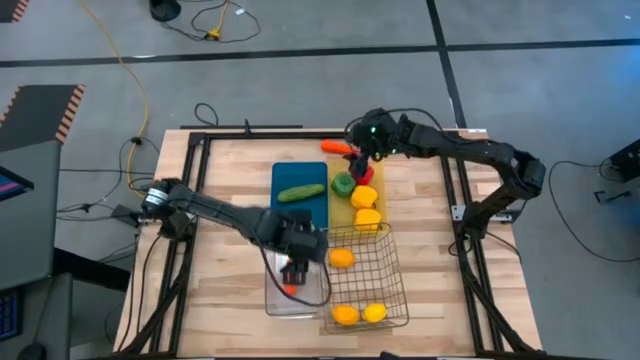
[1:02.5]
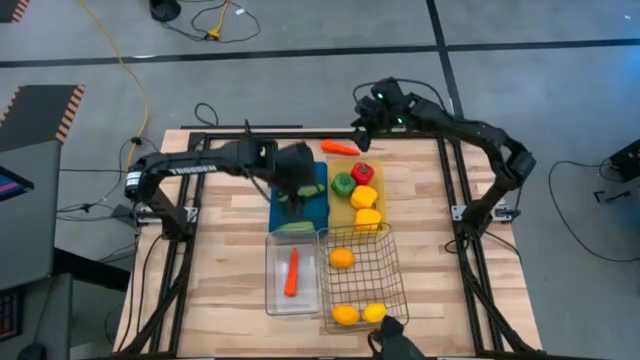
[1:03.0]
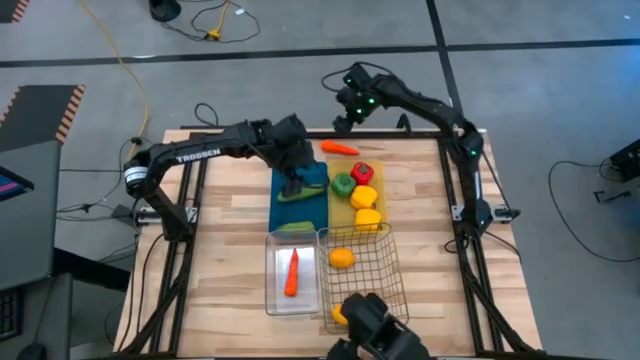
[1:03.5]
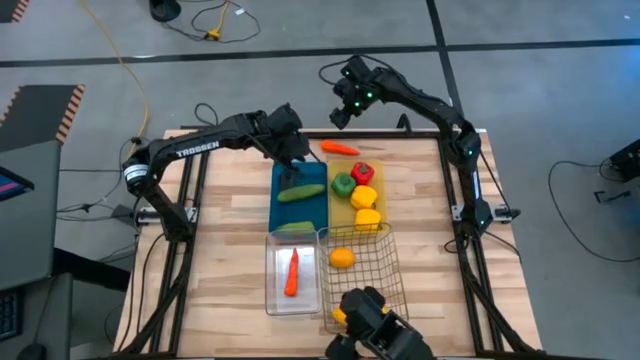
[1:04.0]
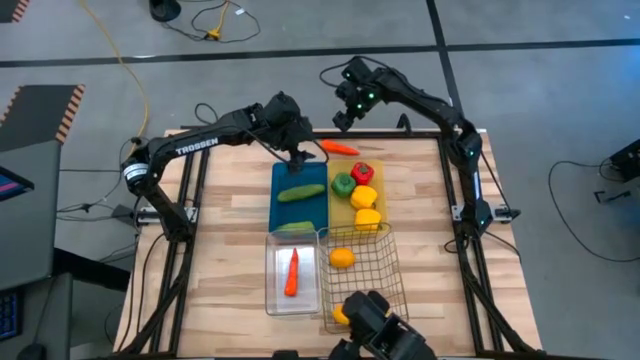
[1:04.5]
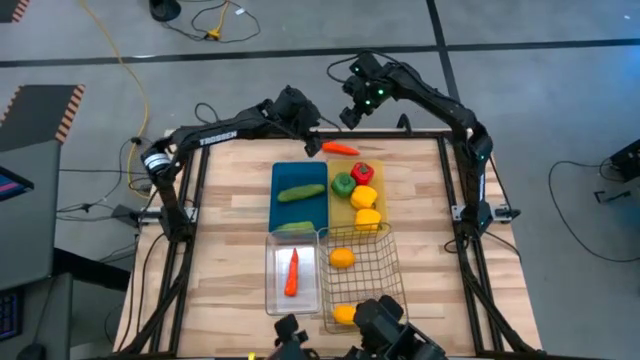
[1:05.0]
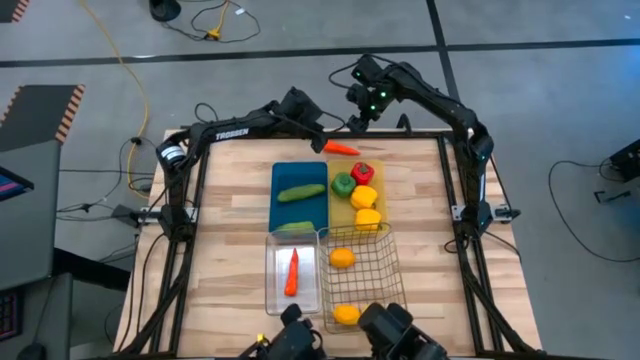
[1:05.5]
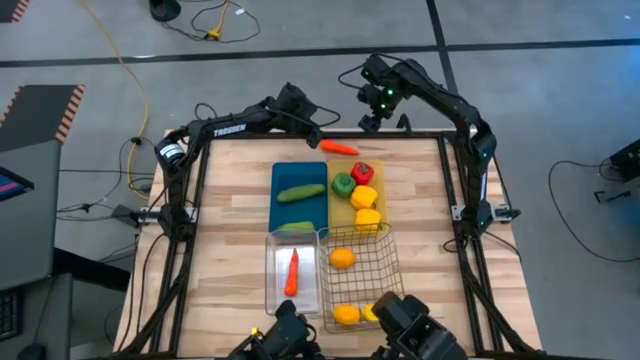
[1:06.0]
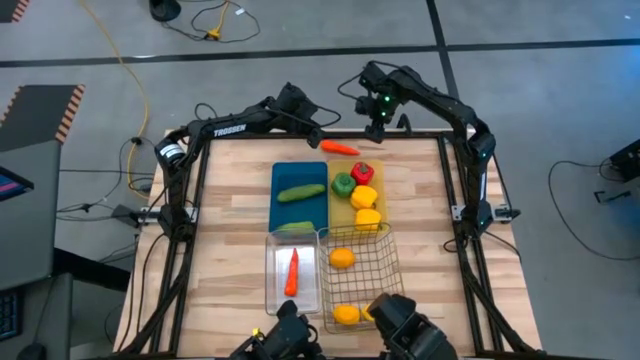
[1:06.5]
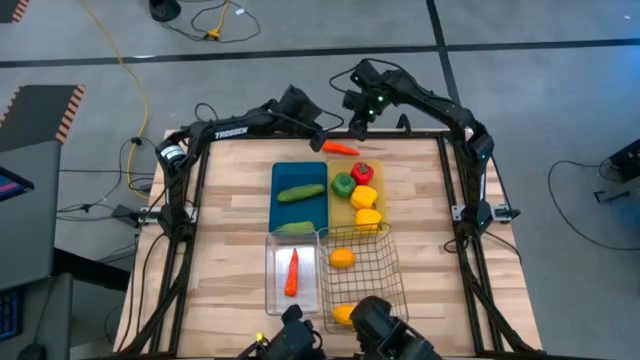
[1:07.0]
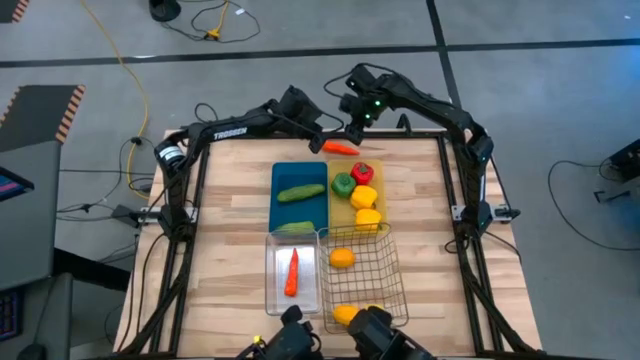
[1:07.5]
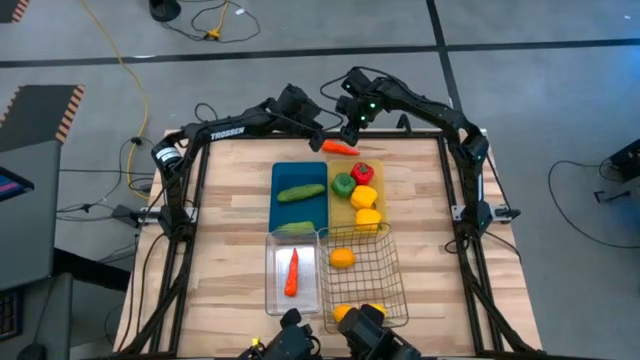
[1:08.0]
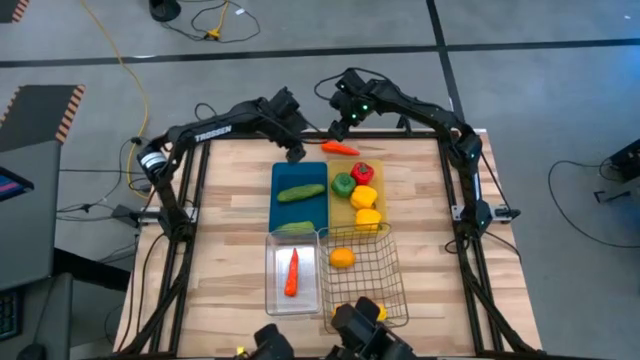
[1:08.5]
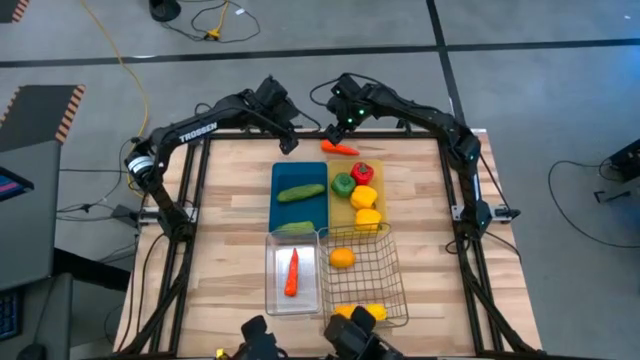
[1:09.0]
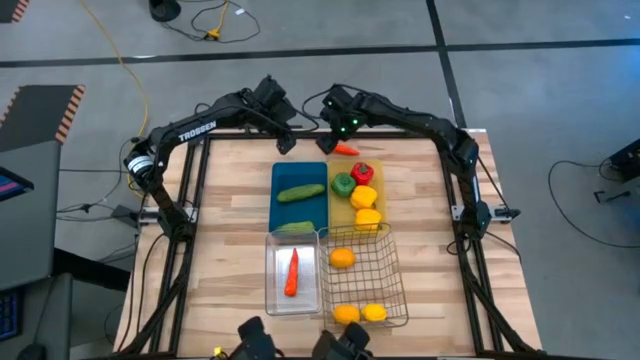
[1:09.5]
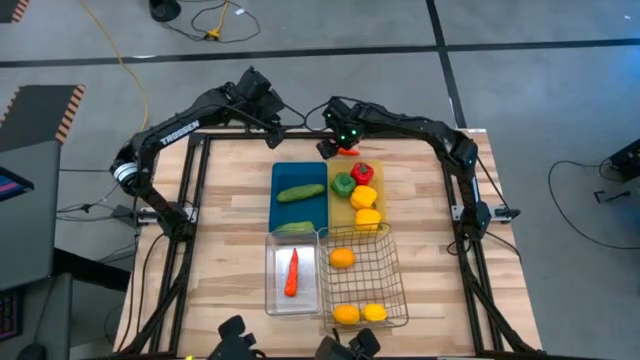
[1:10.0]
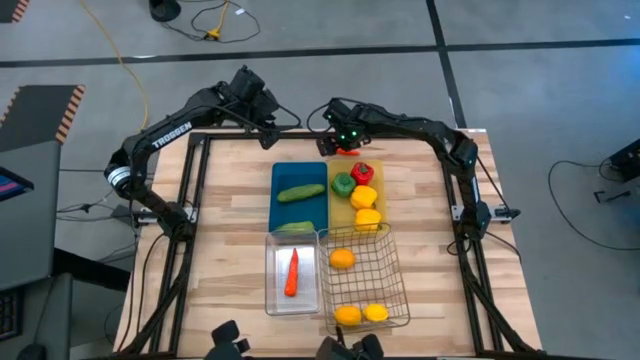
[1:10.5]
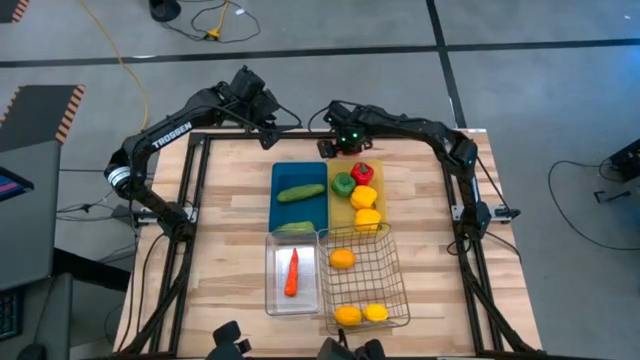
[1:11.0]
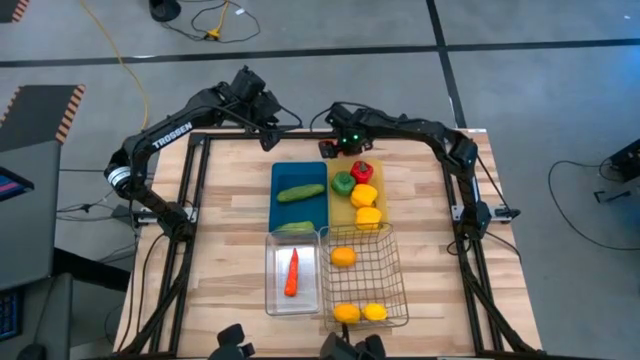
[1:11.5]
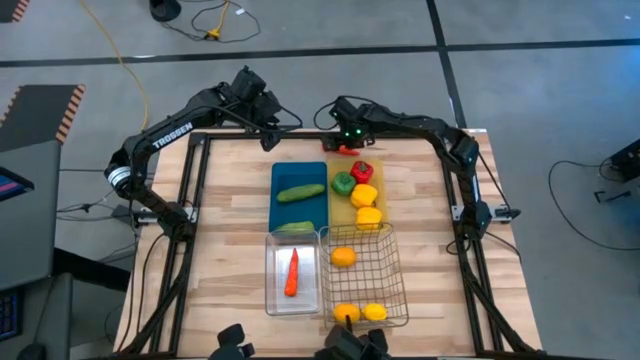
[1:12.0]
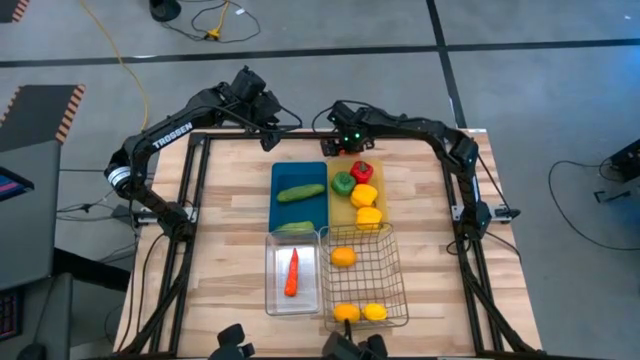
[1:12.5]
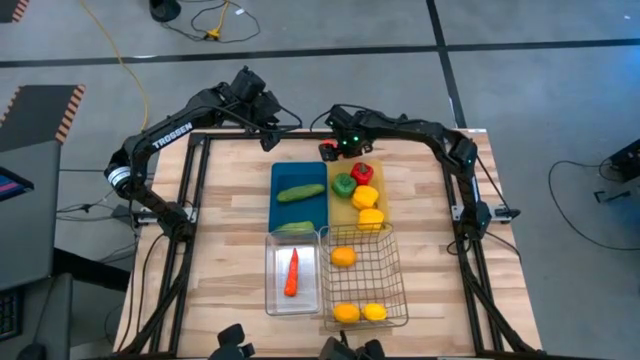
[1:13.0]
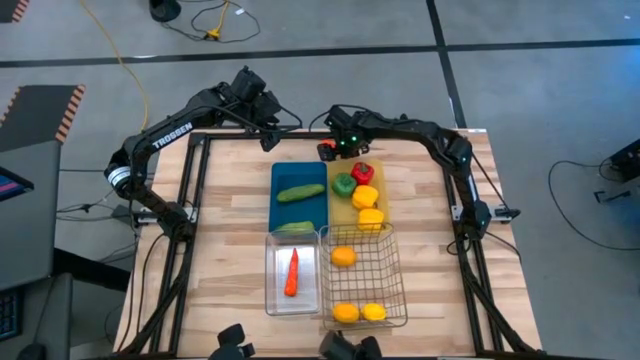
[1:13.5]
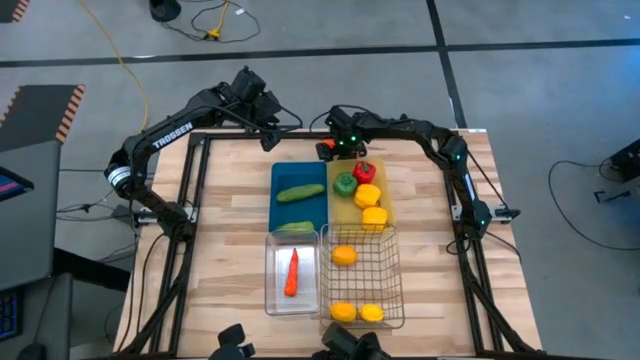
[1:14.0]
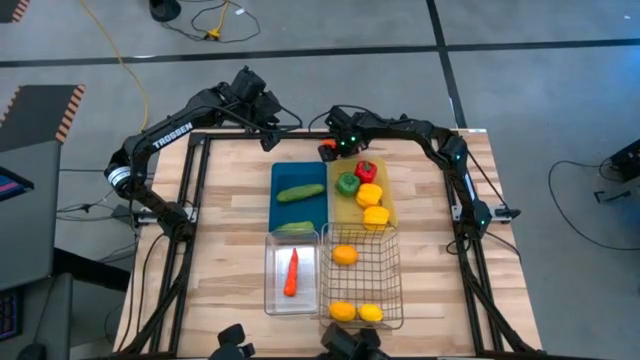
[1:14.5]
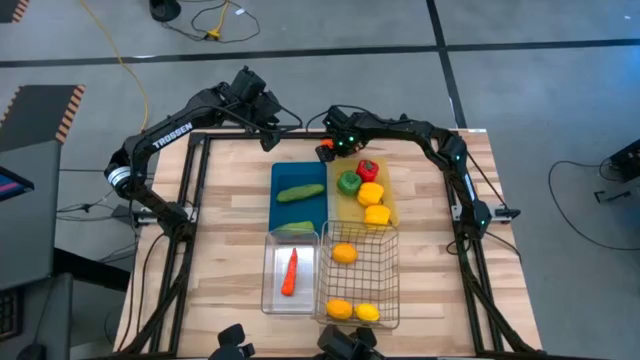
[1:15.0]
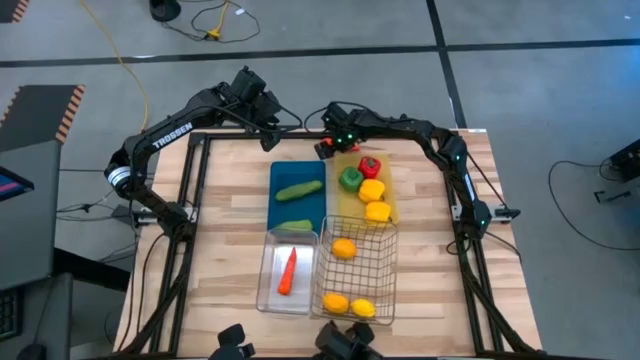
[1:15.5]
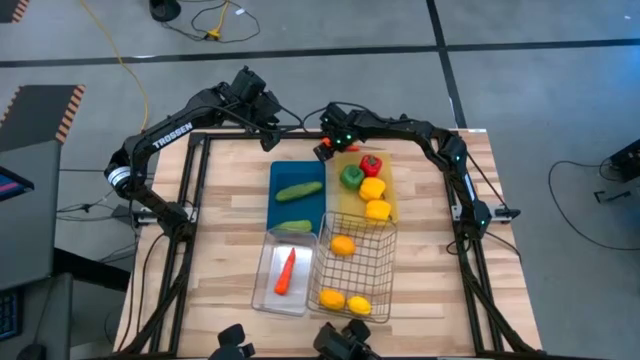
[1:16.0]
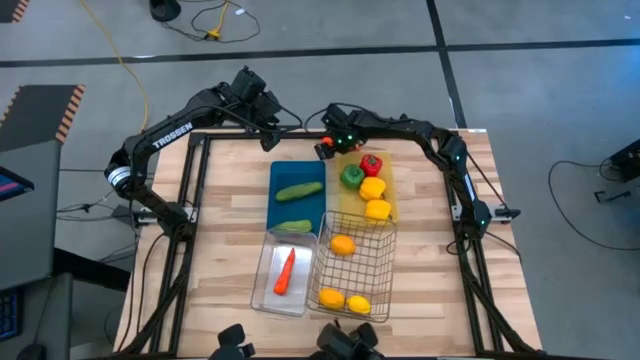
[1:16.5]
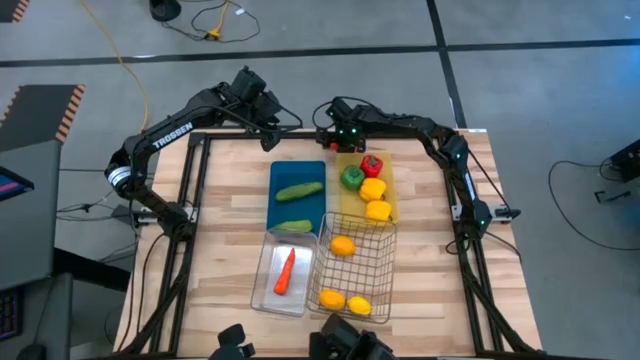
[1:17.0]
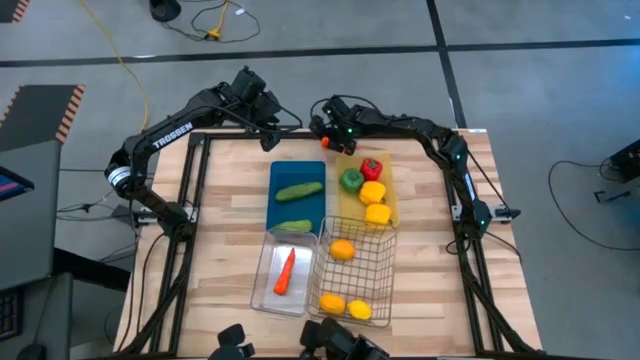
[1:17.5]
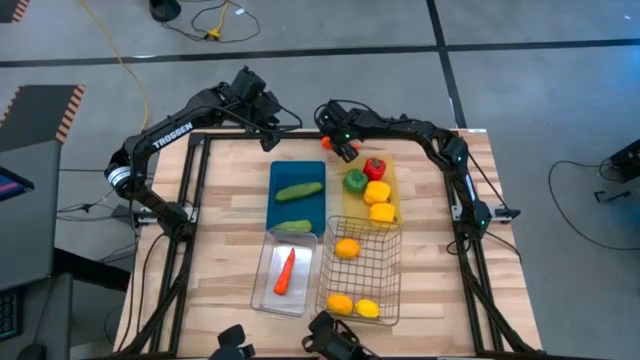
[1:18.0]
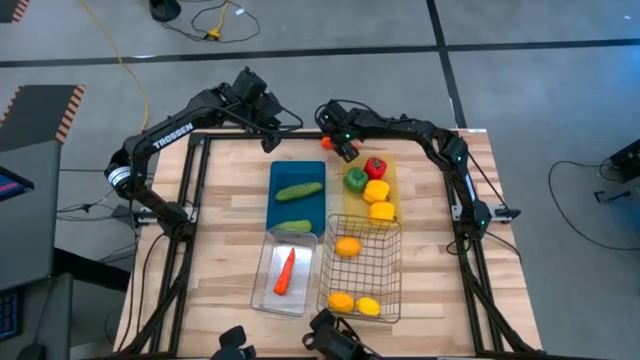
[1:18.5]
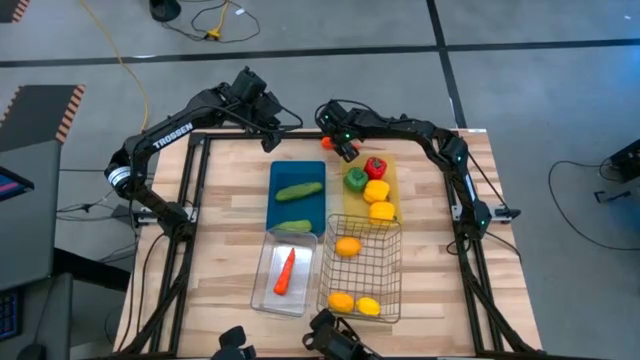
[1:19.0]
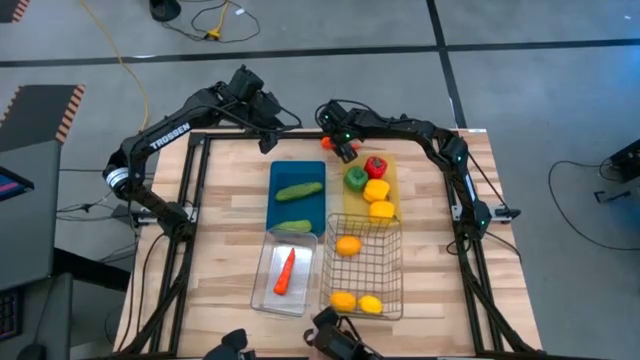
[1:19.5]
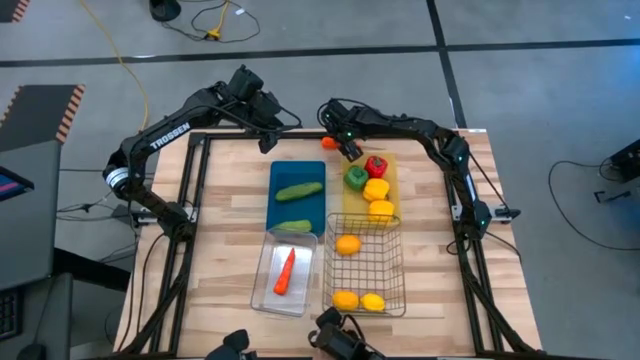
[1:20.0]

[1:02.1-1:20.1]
Task: Sort produce into baskets
Put the carrot into the transparent basket

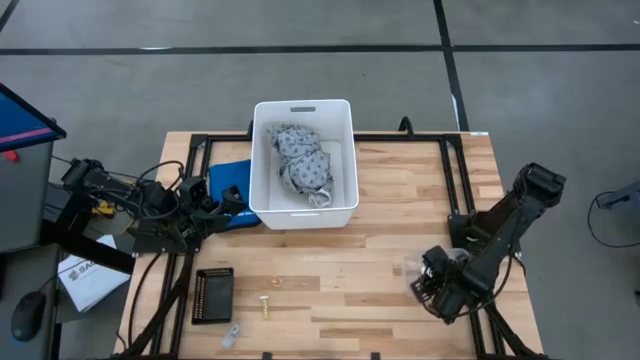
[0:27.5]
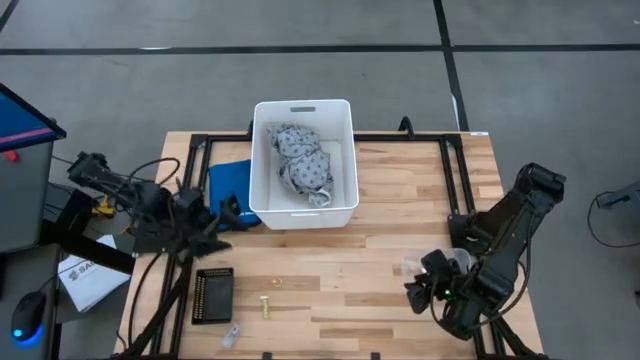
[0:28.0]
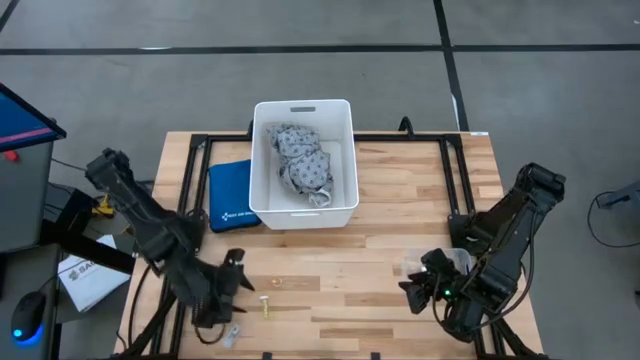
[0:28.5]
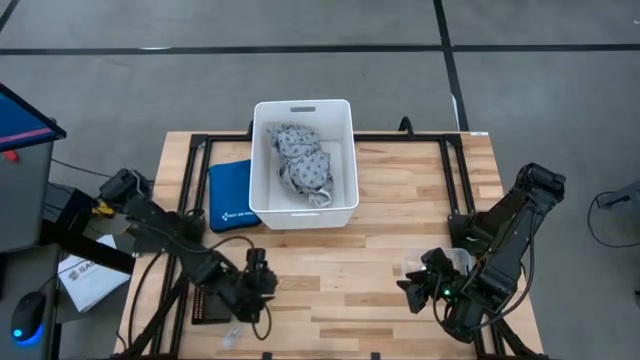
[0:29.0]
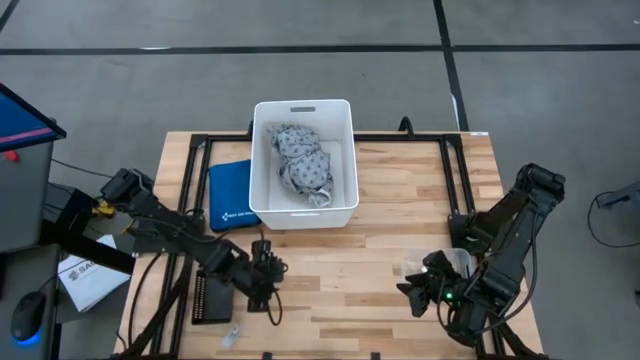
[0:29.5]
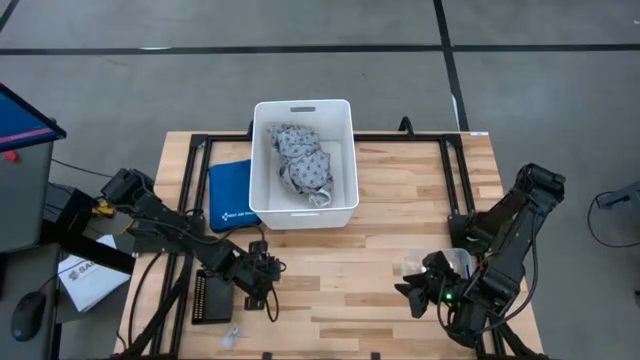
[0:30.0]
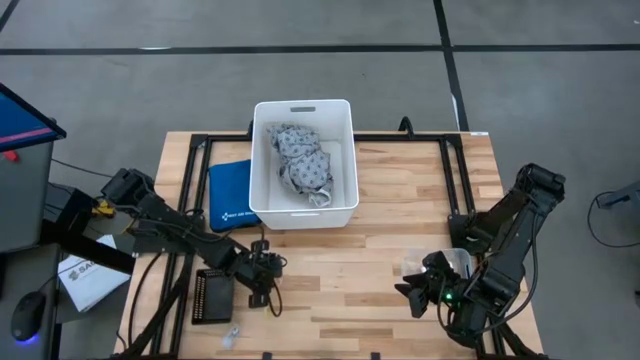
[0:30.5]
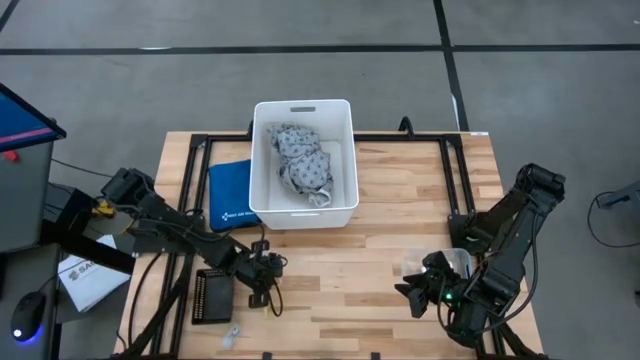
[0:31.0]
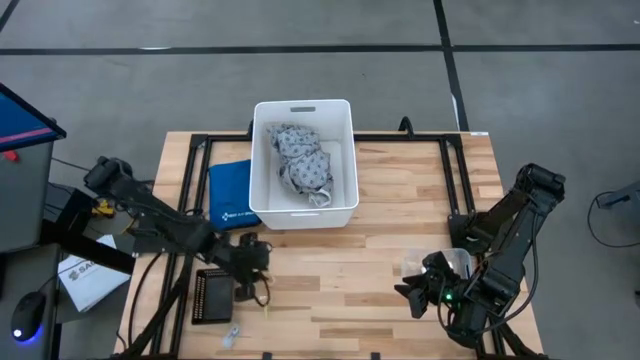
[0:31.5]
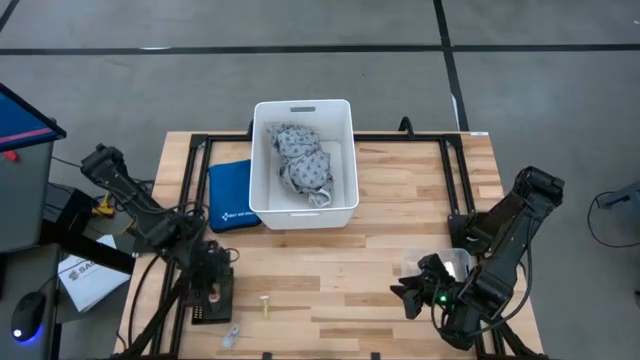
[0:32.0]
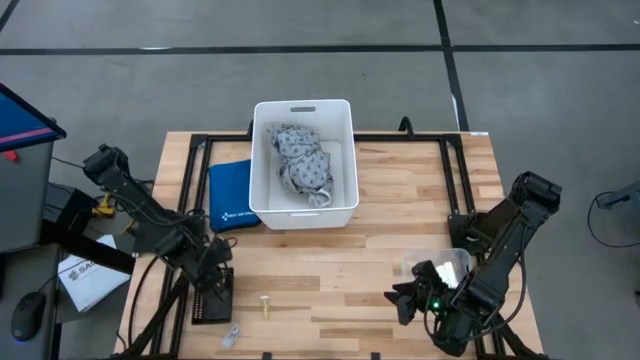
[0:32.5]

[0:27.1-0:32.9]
Task: Pick & Place Medicine items
Put the top yellow pill bottle into the black bin
